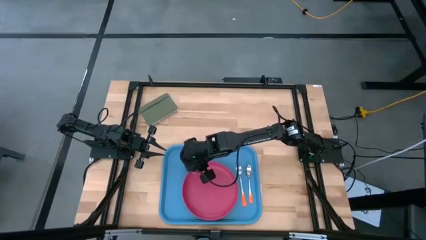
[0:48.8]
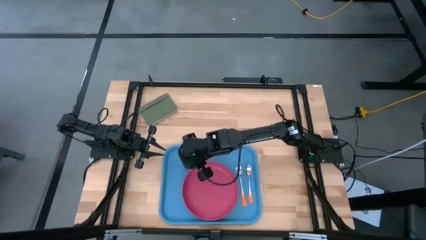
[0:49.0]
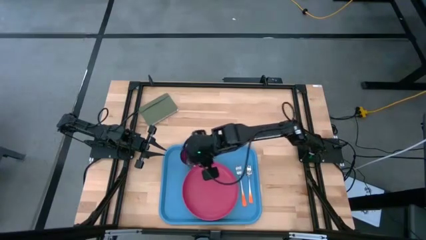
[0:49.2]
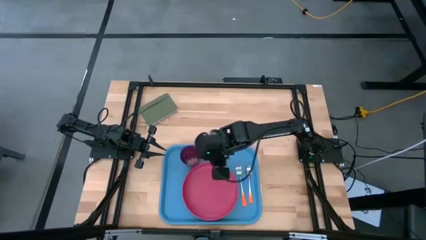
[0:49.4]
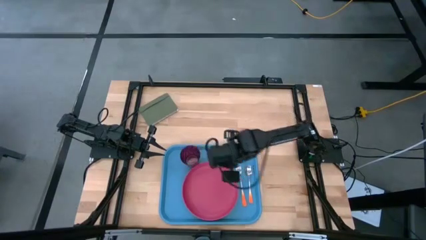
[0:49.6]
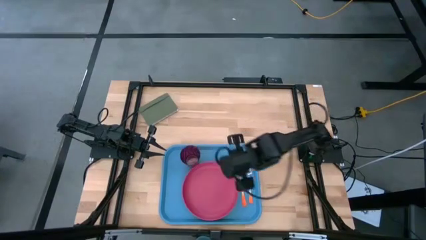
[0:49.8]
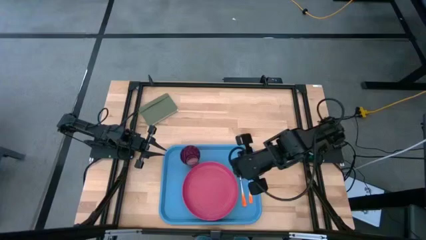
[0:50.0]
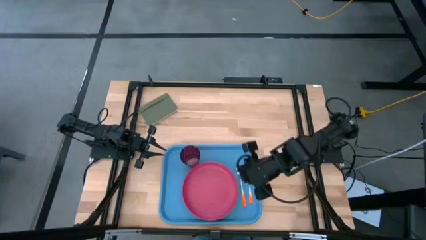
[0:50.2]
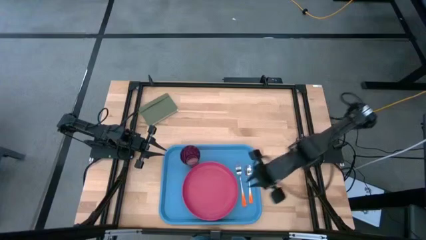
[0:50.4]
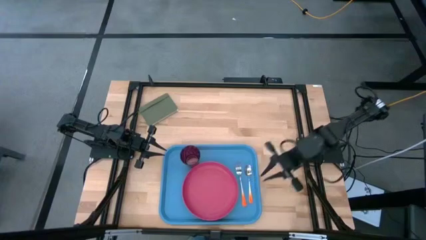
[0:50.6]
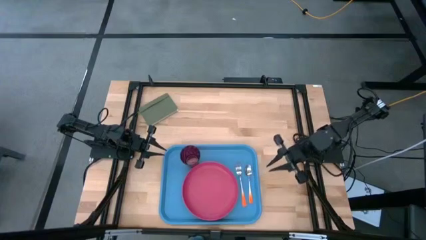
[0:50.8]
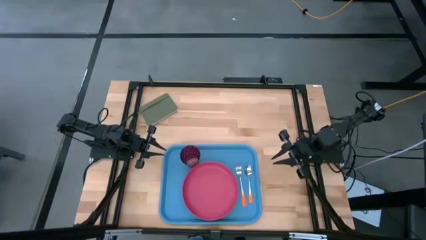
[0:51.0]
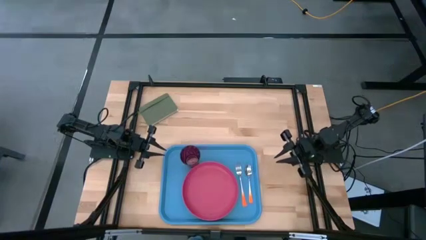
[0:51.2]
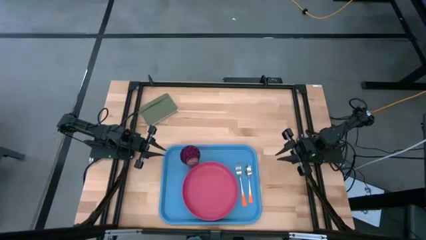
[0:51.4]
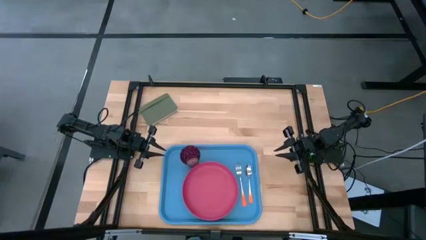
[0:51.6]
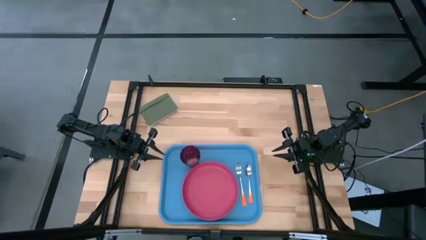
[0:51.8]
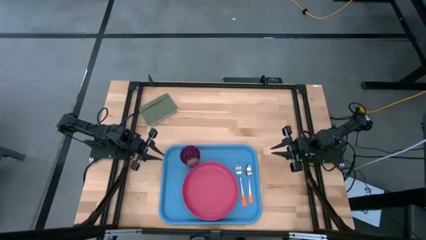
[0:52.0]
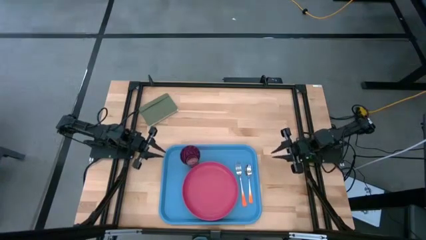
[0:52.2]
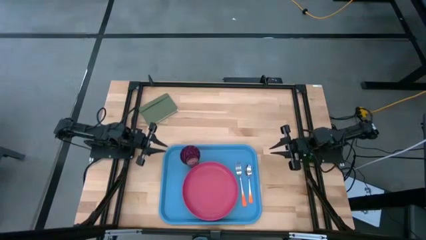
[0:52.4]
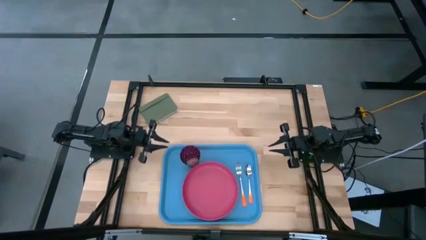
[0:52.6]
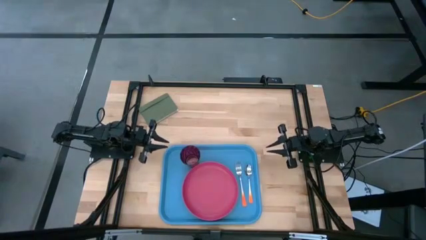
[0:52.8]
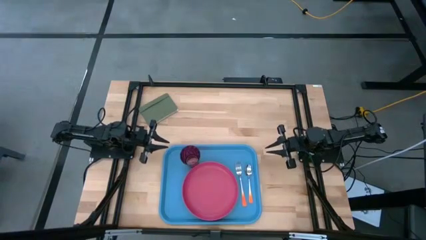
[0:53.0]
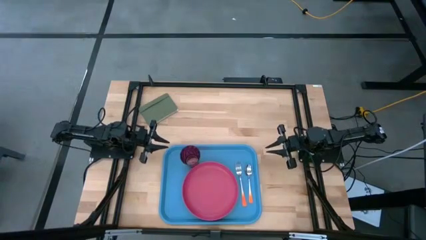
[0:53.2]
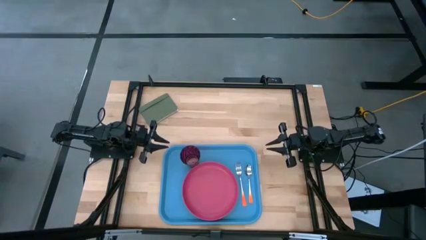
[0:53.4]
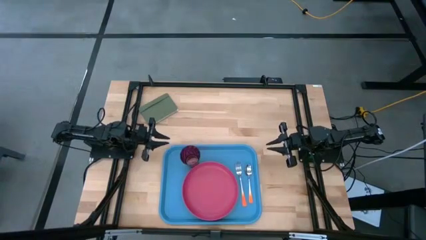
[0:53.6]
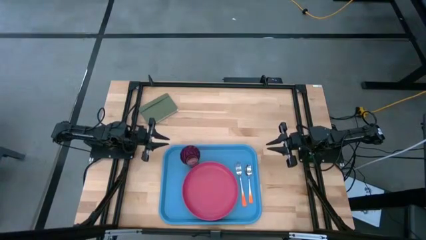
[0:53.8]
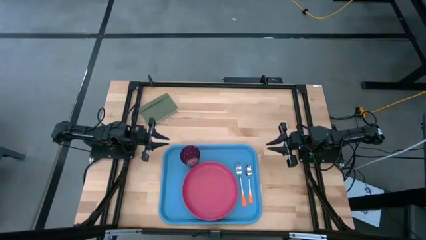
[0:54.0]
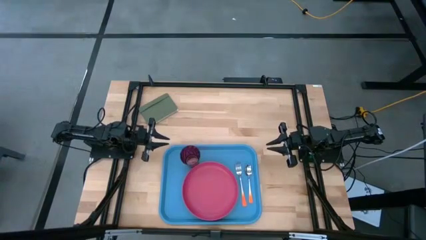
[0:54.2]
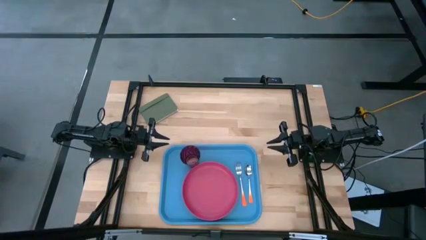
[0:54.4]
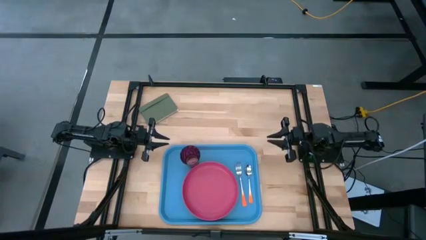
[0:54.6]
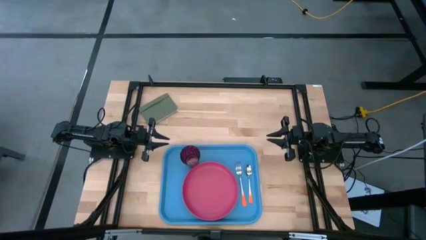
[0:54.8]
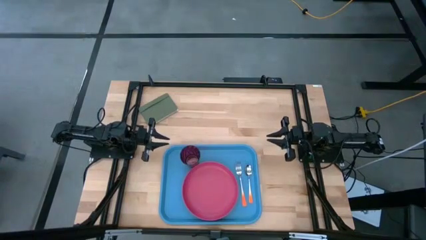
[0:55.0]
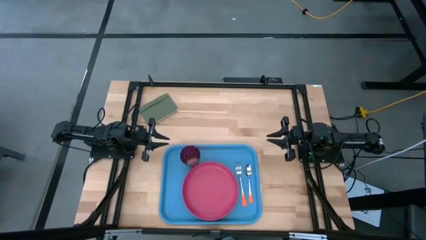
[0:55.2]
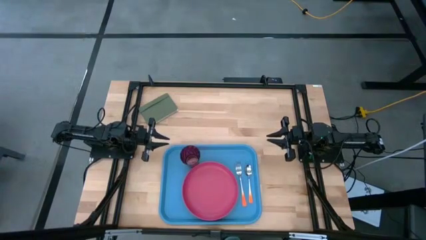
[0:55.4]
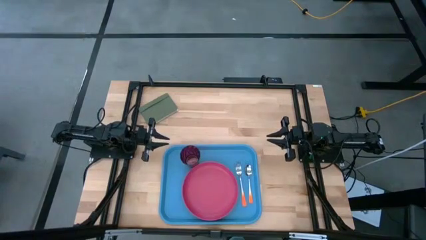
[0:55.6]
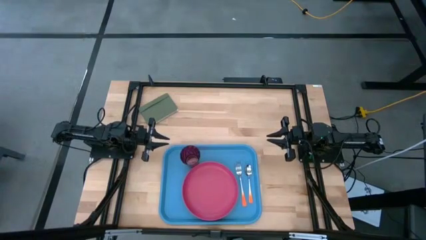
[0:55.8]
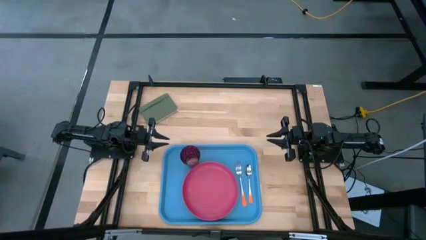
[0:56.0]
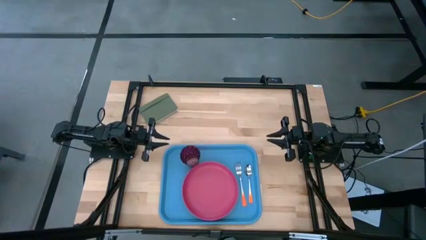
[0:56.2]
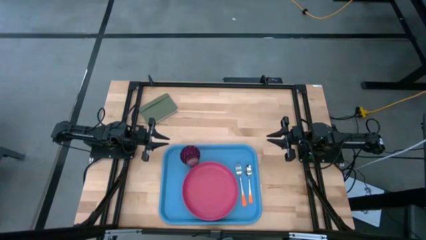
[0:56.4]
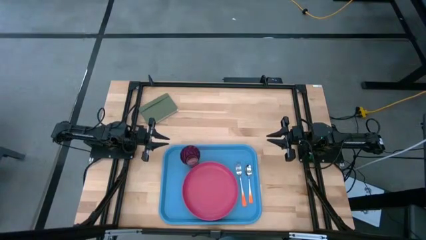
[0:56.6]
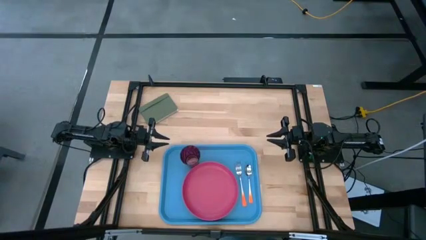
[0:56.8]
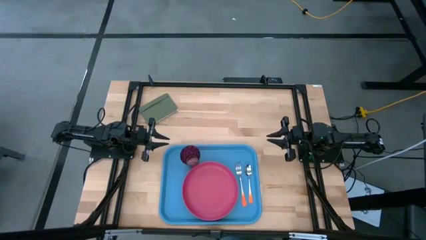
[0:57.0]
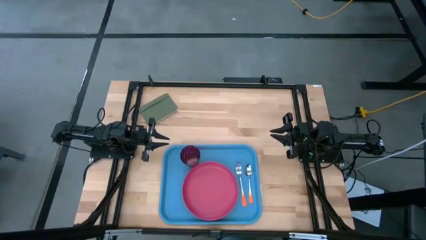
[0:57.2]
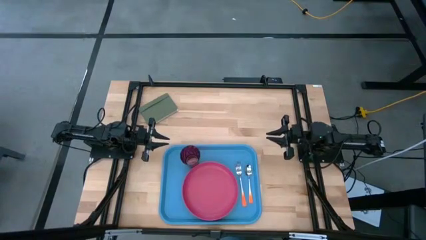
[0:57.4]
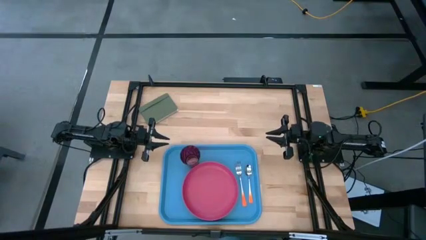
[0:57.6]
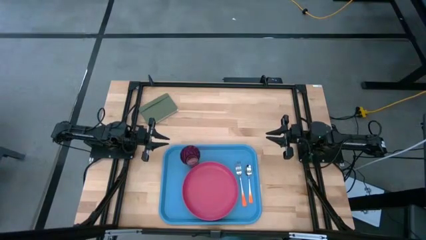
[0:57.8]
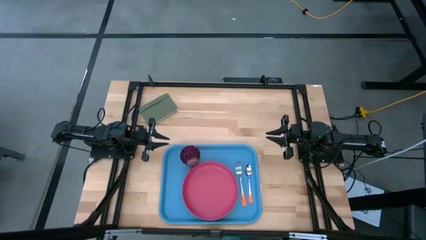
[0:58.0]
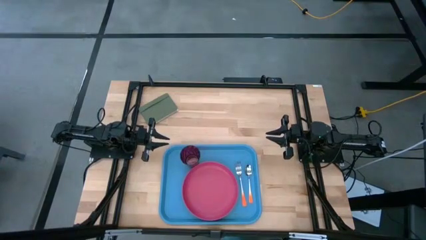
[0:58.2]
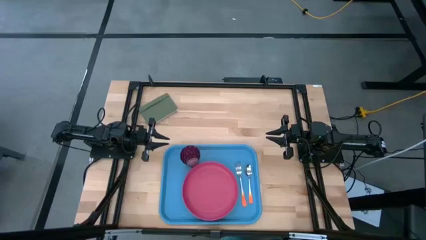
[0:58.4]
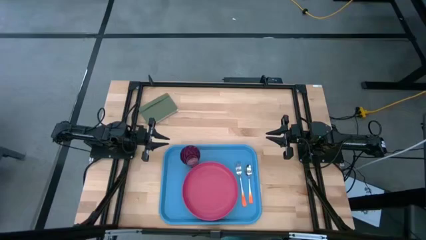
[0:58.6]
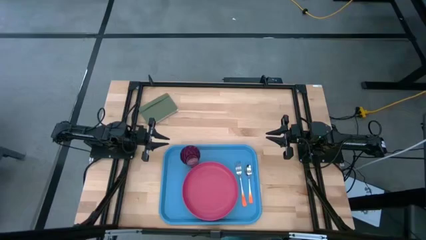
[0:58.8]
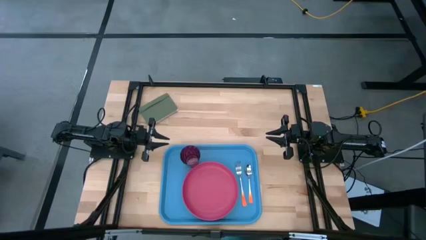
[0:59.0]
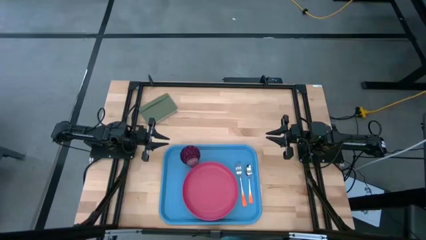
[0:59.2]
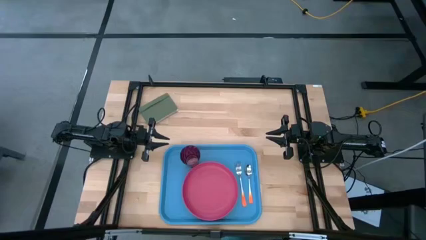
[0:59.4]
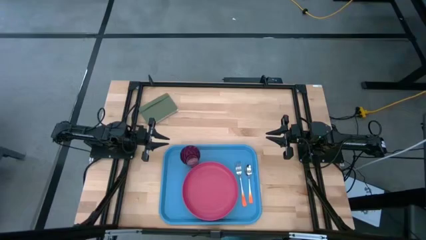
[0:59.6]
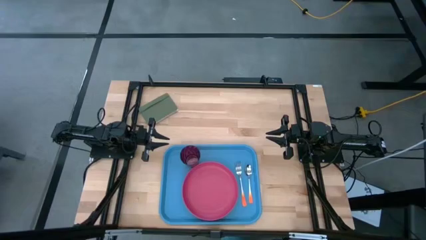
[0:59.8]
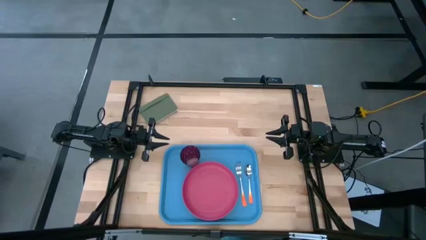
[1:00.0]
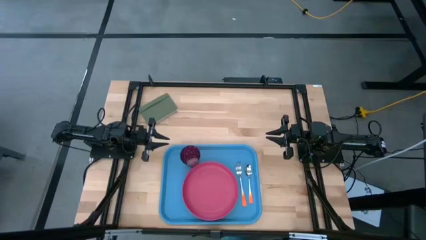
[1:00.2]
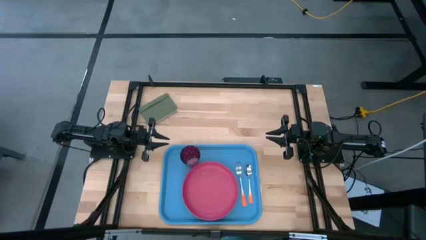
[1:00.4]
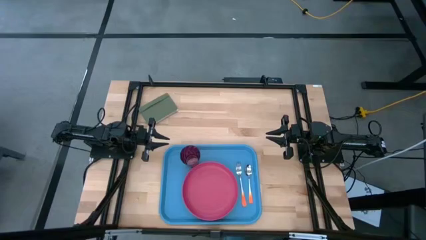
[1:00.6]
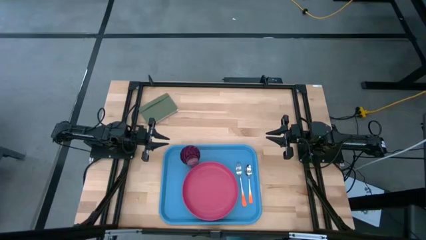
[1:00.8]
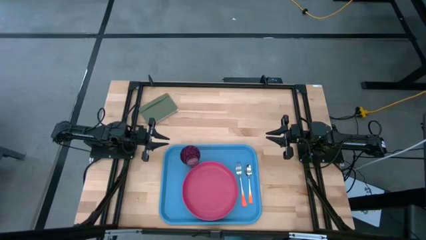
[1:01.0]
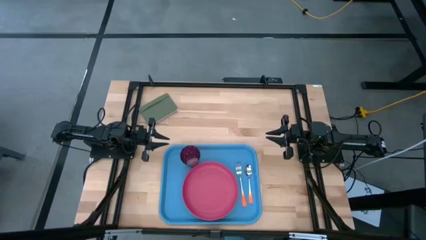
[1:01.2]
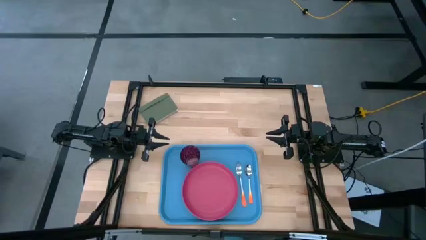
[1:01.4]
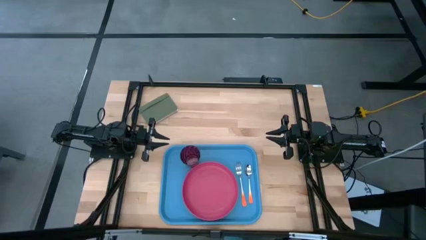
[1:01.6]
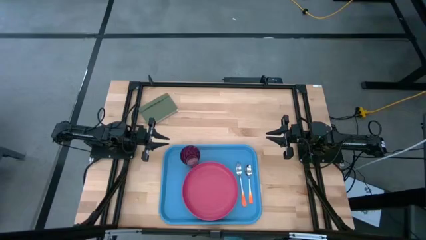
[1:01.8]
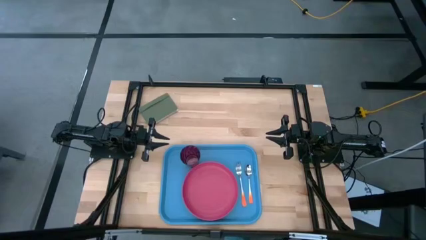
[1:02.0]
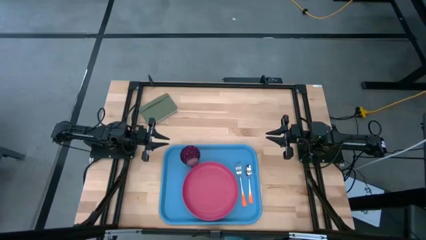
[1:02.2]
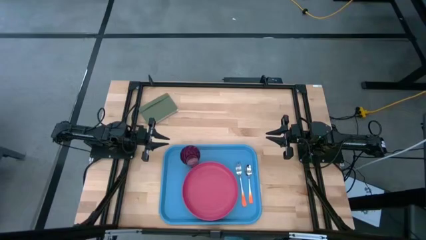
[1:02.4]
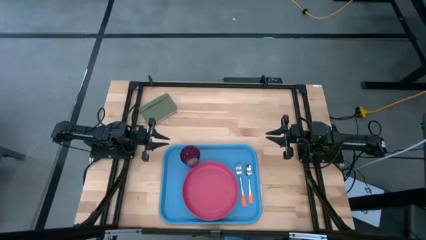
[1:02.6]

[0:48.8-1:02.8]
Task: Pick and place plate/cup/fork/spoon on tray
Return to Home Position
